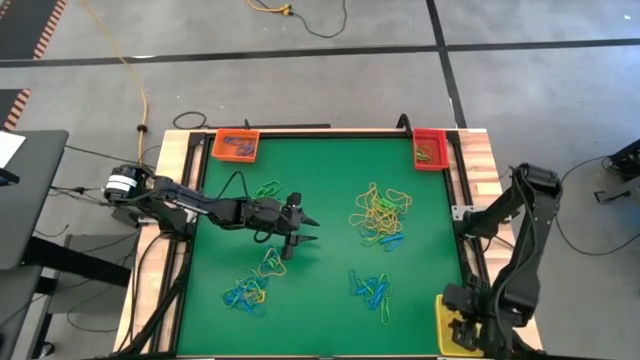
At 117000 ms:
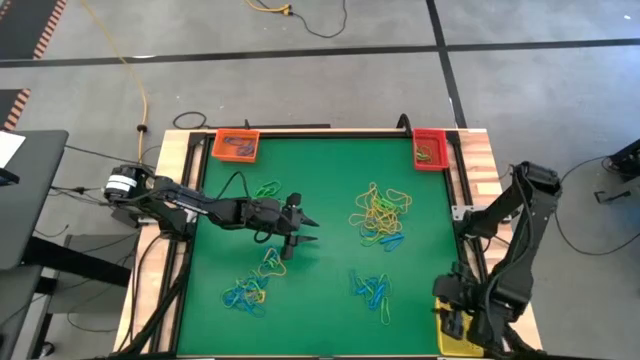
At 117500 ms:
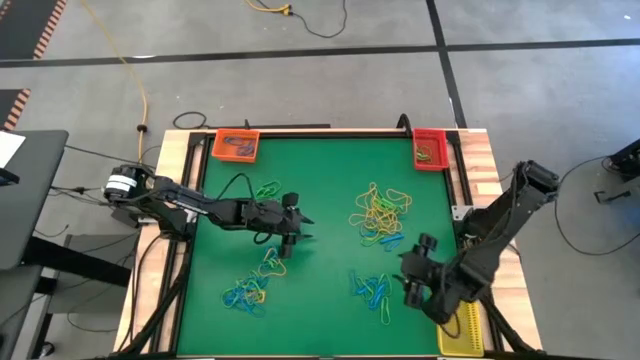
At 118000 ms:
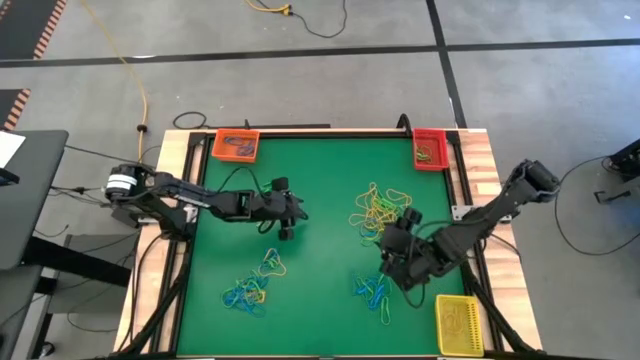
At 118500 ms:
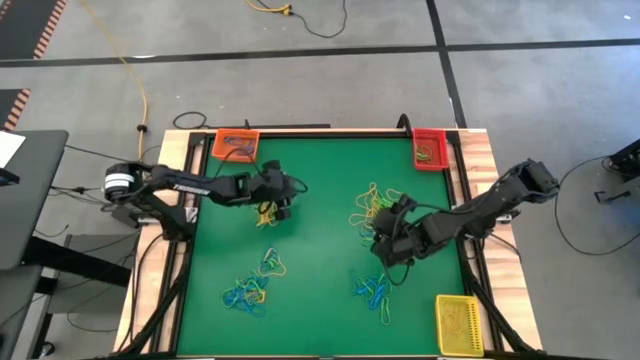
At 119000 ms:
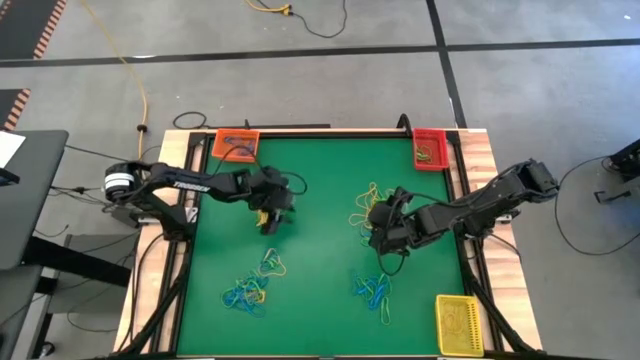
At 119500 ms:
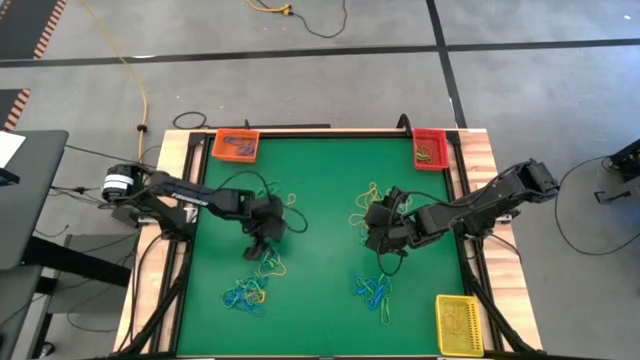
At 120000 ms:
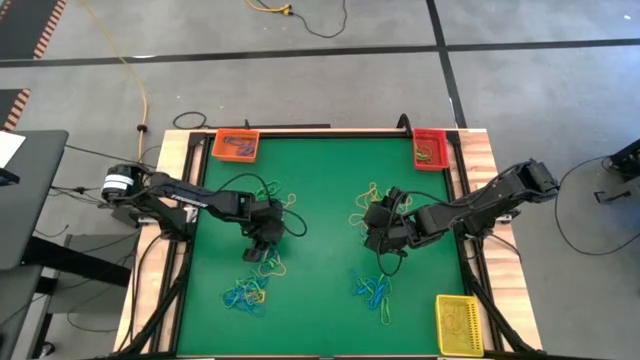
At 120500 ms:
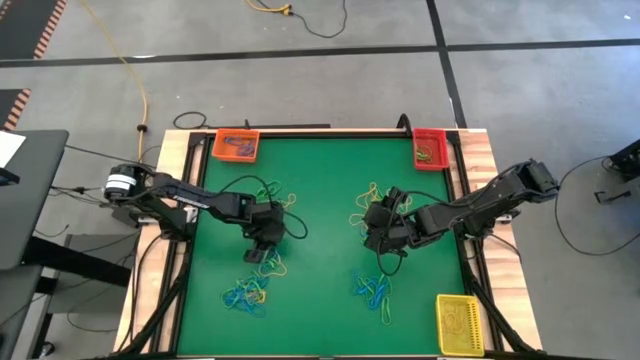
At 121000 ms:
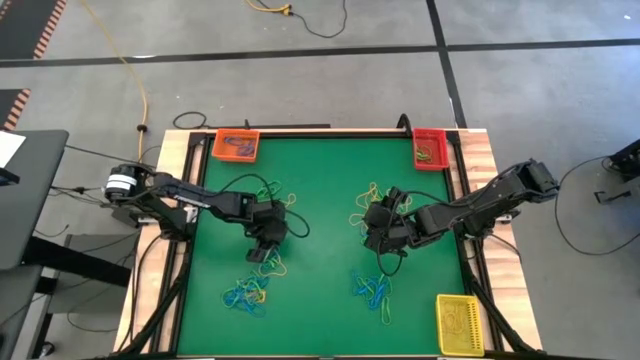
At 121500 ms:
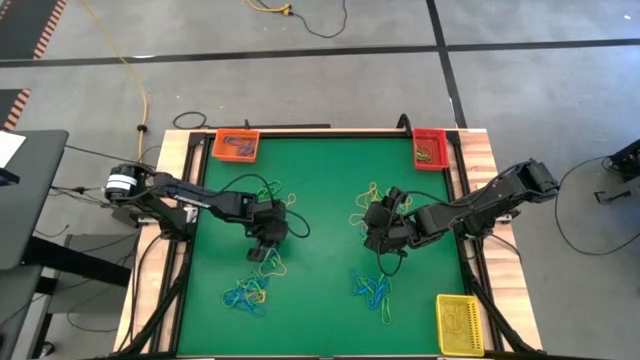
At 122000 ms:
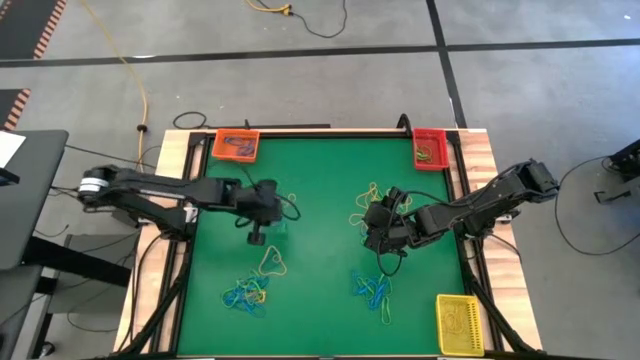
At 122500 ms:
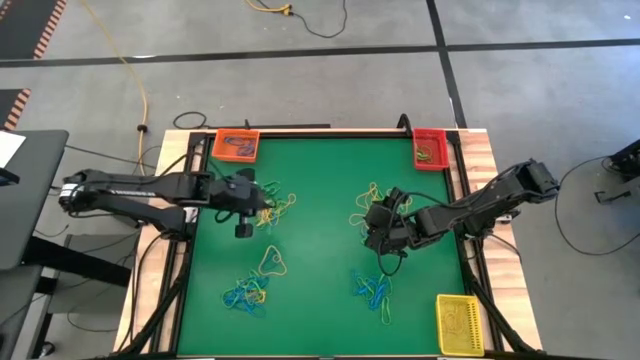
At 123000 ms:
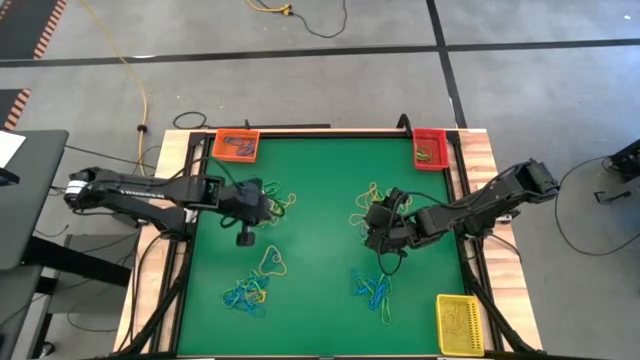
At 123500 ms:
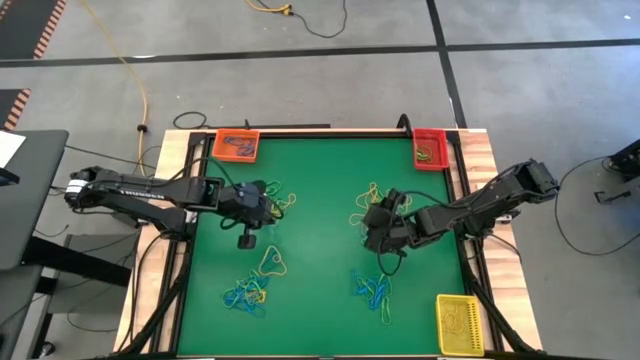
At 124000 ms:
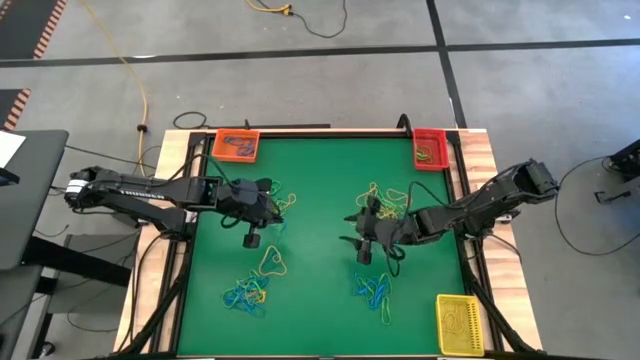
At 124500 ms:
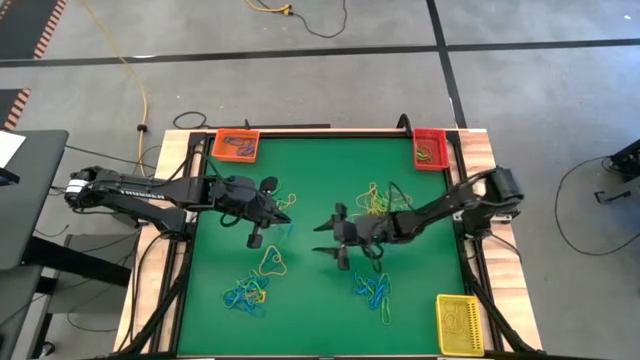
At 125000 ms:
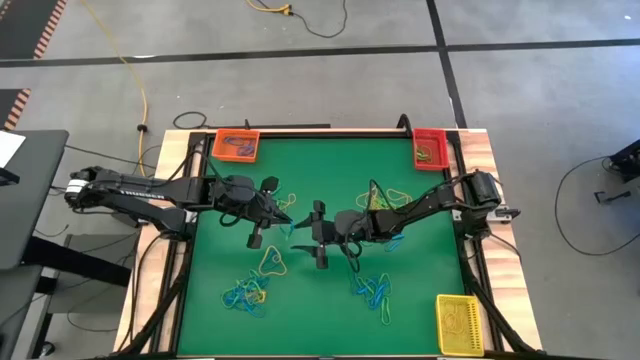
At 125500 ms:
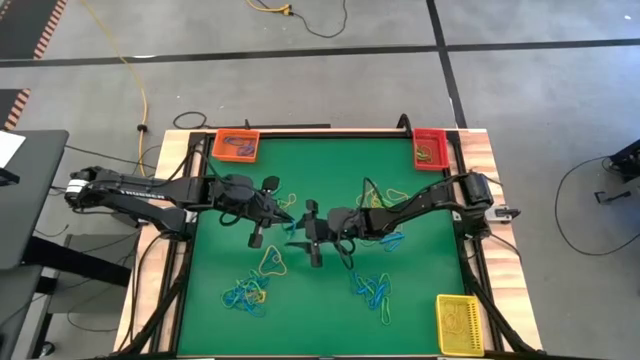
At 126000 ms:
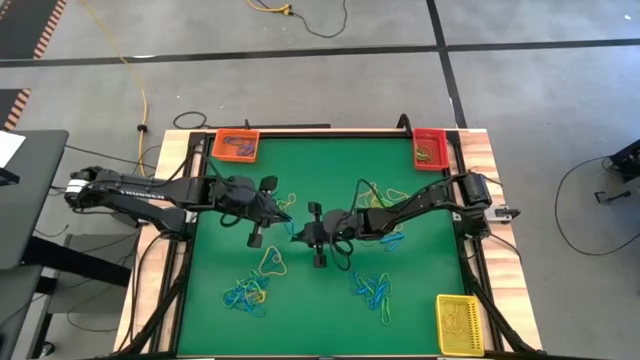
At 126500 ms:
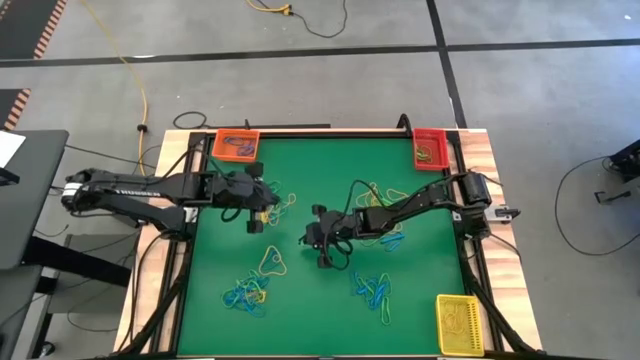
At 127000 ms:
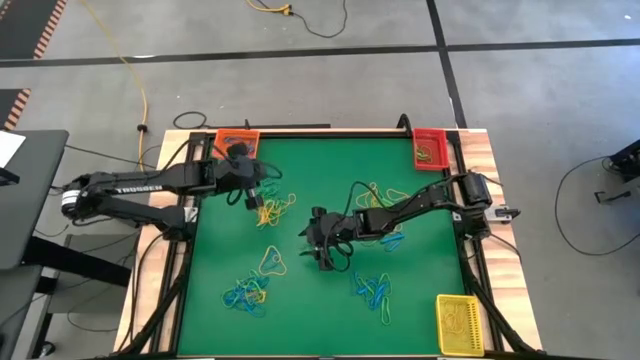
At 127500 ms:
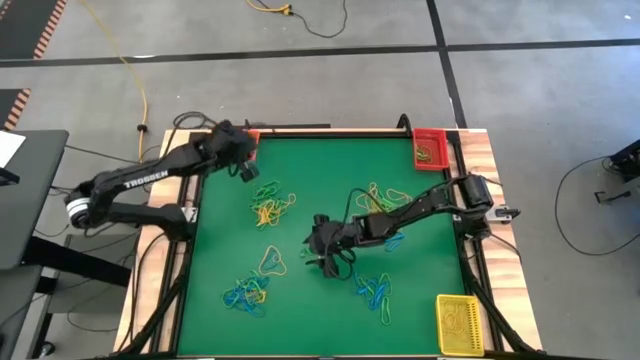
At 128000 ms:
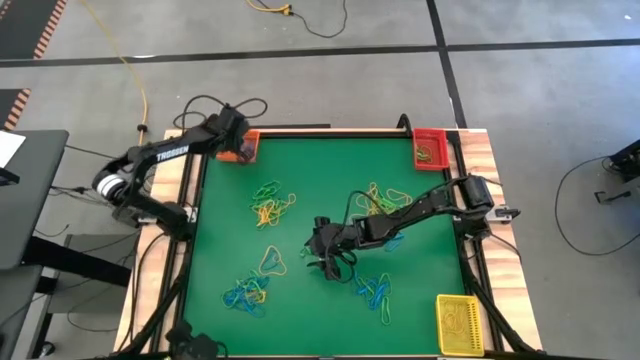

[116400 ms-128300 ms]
Task: Sort rubber bands into baskets
Put the bottom left blue rubber band into the orange bin

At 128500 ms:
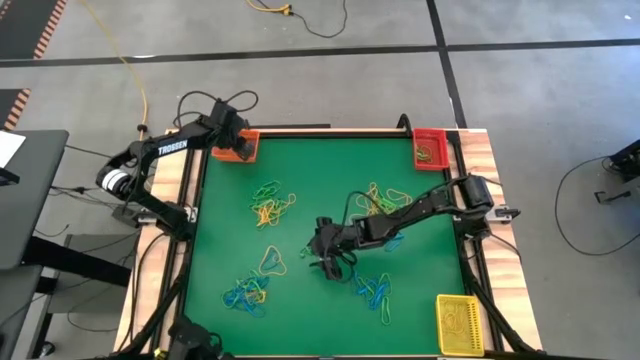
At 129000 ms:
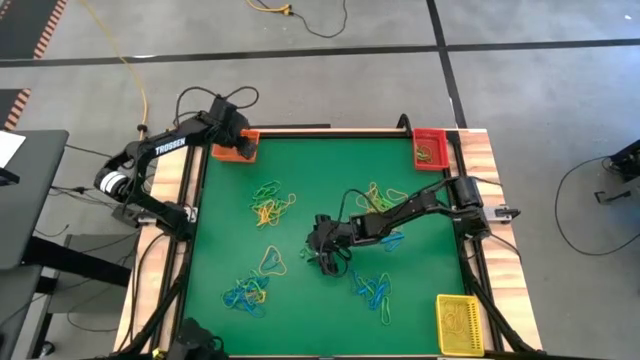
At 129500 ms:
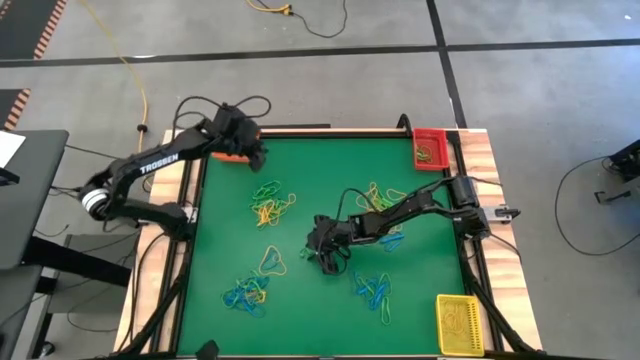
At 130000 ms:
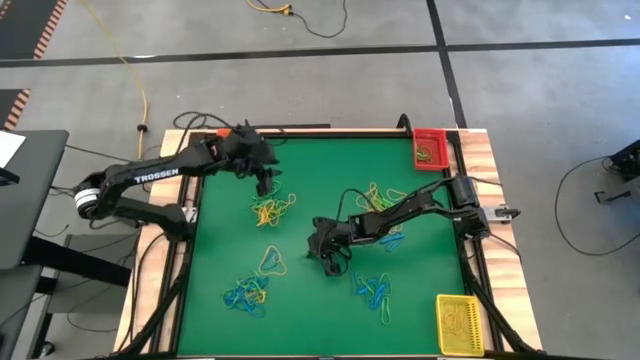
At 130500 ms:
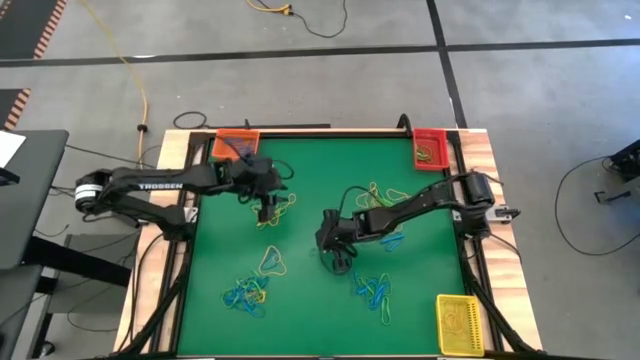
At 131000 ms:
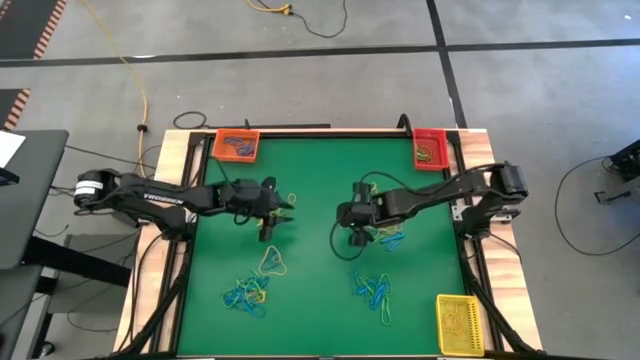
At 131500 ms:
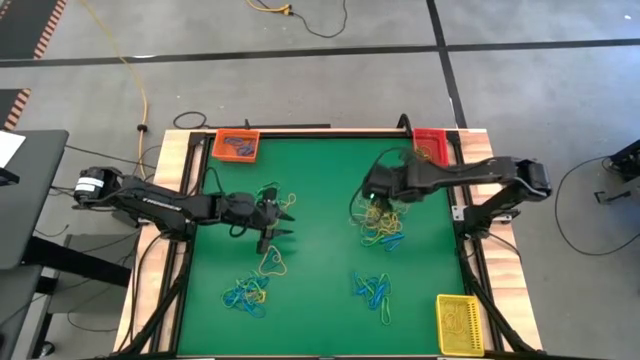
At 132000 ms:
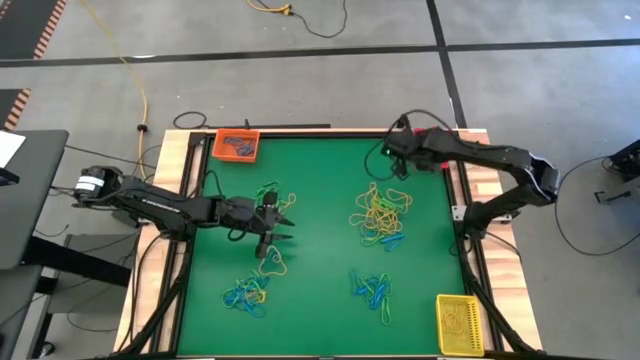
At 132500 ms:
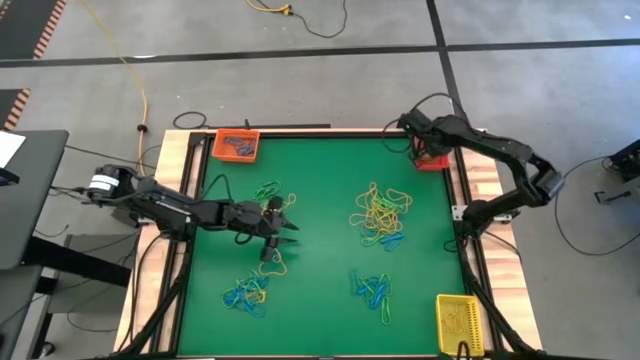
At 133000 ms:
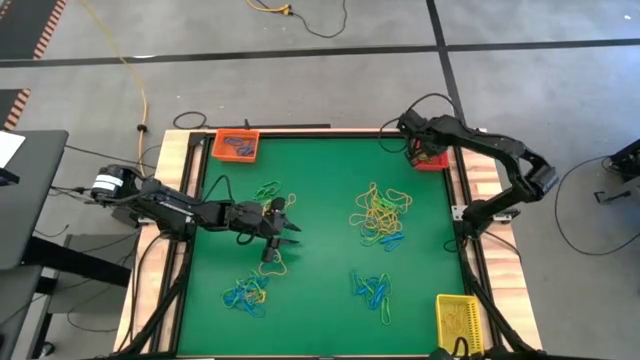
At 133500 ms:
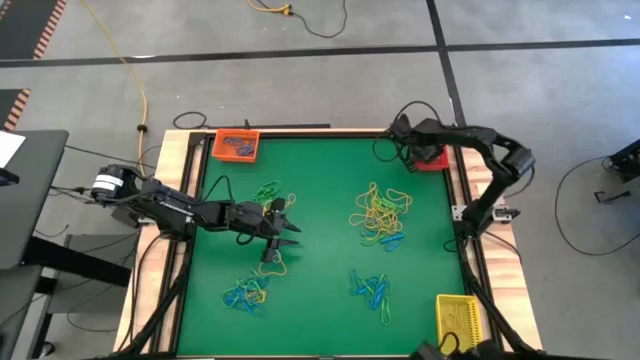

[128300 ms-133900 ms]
Put the bottom left green rubber band into the red bin
